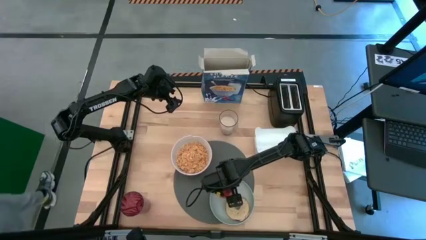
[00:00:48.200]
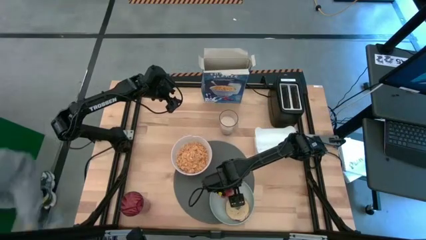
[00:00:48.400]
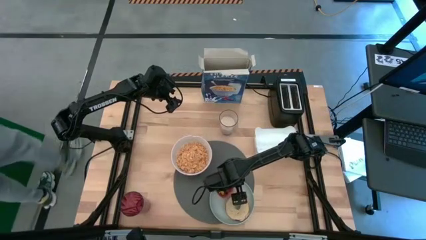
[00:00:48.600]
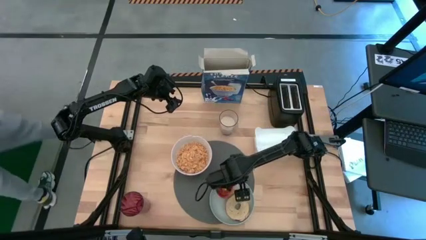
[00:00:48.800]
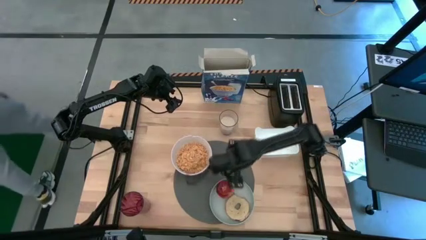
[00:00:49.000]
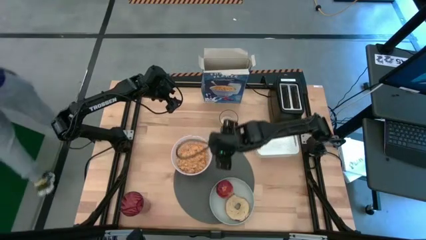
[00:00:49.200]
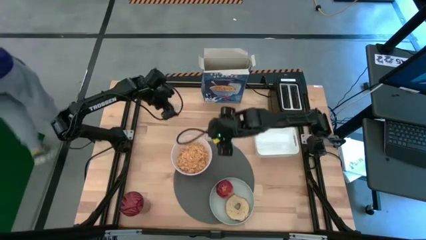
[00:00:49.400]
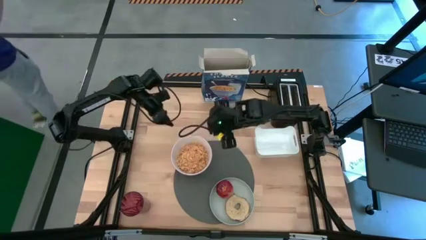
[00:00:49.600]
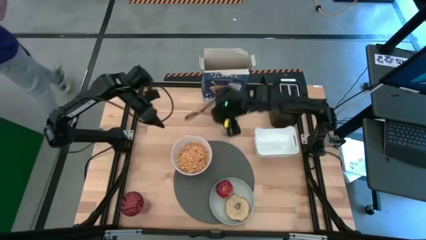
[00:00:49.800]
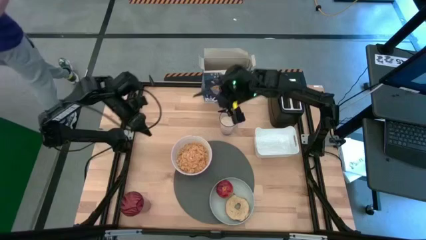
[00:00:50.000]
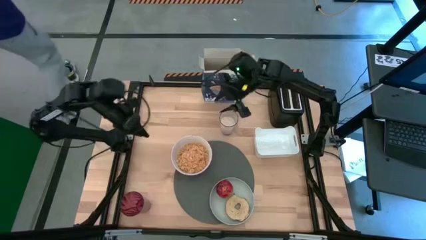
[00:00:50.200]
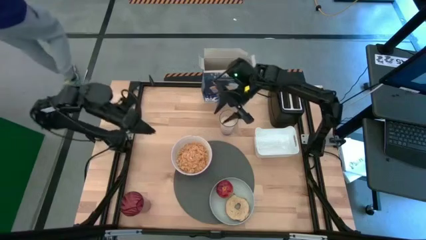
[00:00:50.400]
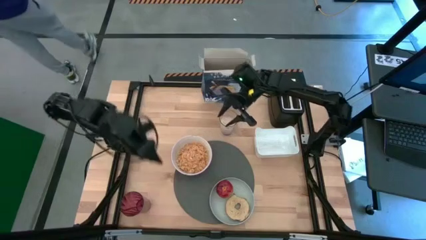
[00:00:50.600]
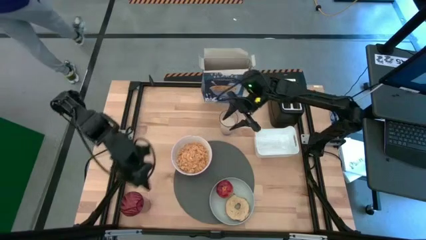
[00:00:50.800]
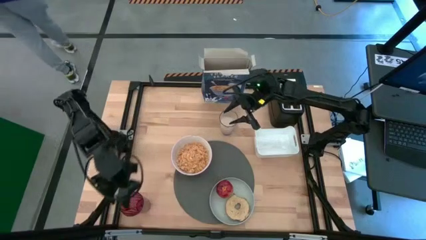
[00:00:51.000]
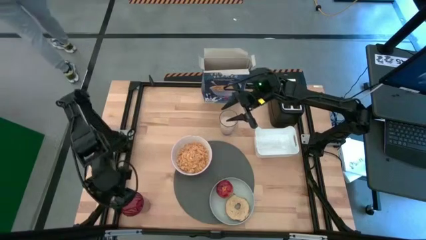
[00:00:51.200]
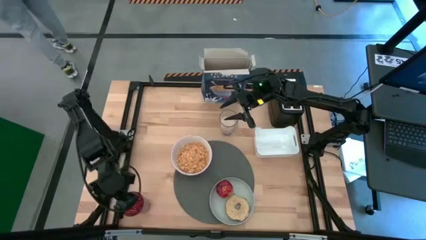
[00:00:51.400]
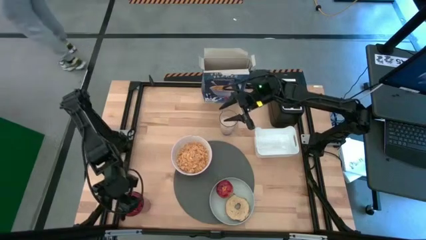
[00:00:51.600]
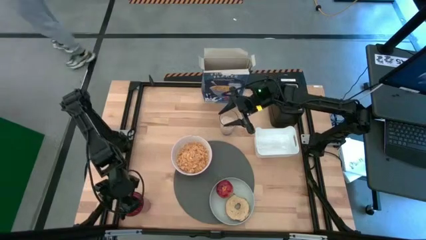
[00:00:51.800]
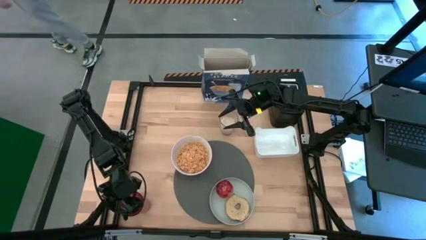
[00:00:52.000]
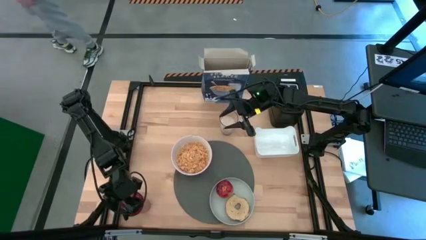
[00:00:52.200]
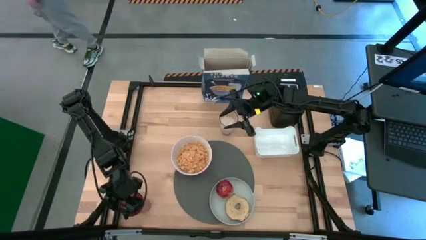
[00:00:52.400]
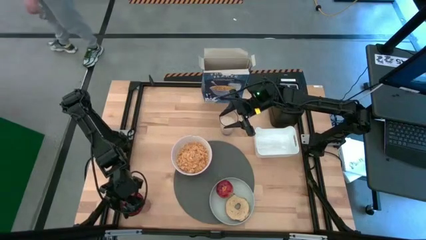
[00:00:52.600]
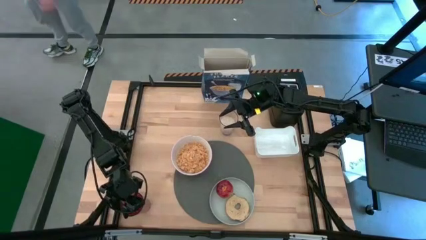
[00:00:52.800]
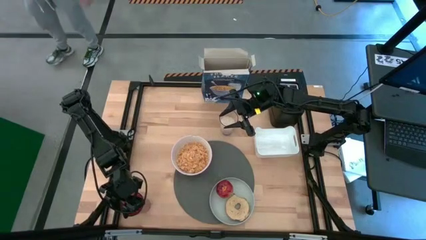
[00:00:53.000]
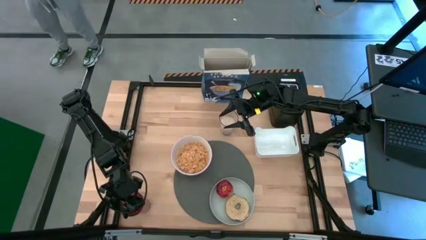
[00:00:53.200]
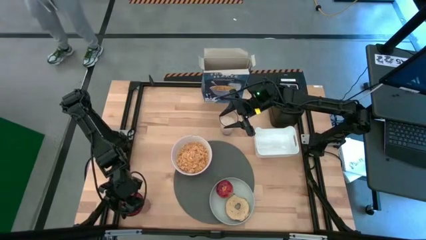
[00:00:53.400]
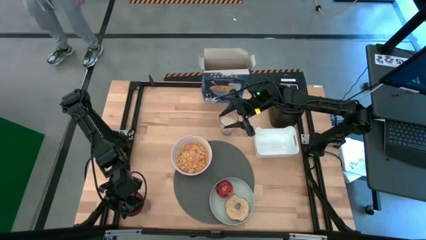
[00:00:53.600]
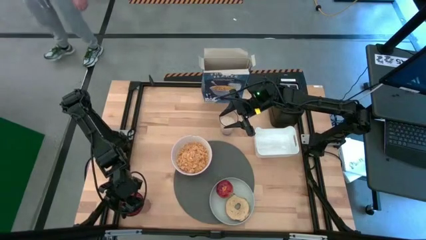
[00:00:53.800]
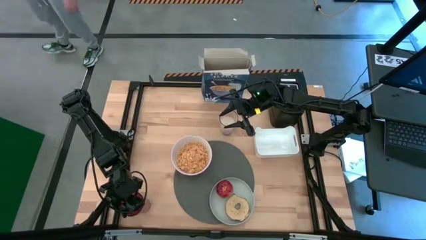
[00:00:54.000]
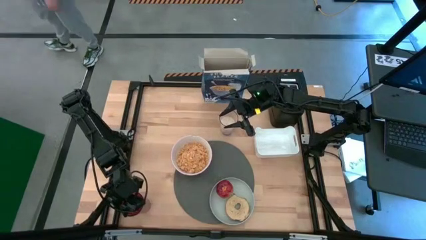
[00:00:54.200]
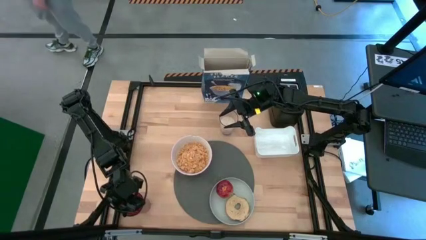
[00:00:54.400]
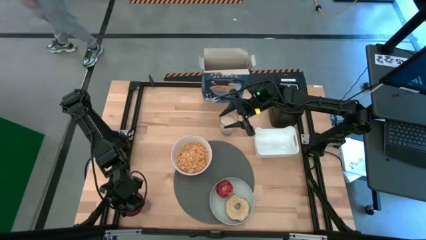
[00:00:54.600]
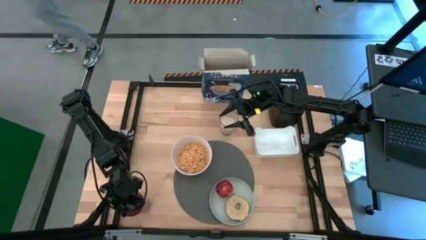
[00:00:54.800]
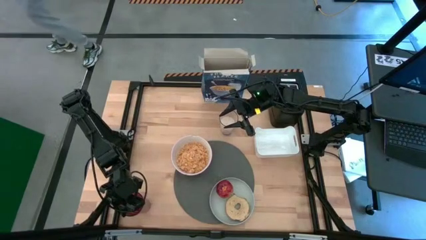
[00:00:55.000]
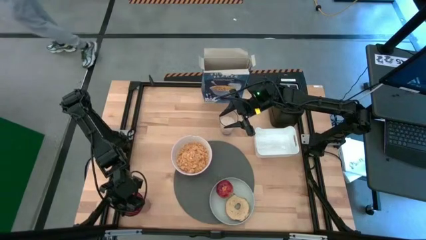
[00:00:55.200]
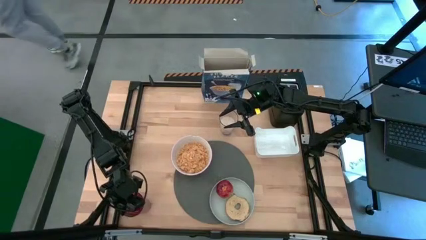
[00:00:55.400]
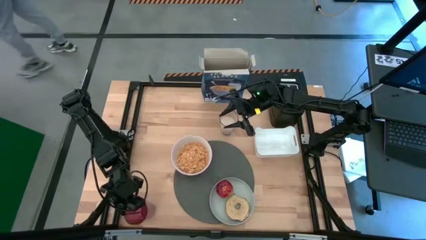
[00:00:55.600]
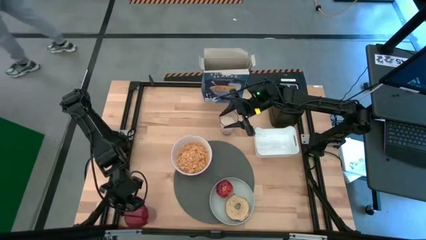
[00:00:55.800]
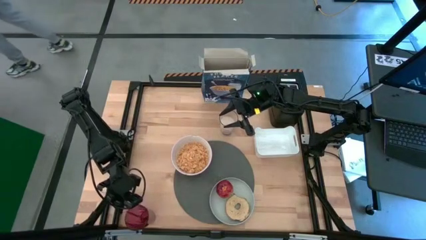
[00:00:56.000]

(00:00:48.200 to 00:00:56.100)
Task: Arrange a breakfast setting
Put the gold spoon on the gray mat to the right of the white bowl

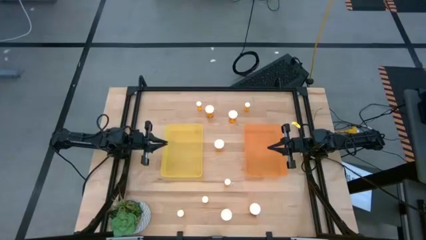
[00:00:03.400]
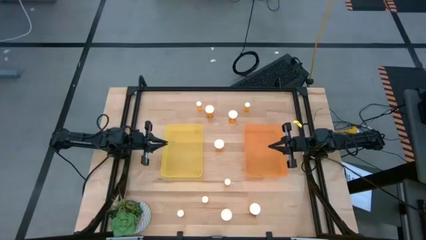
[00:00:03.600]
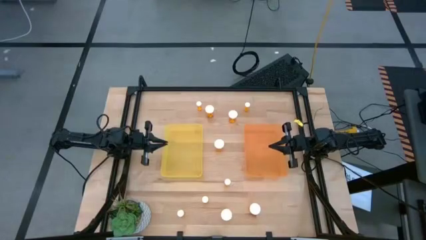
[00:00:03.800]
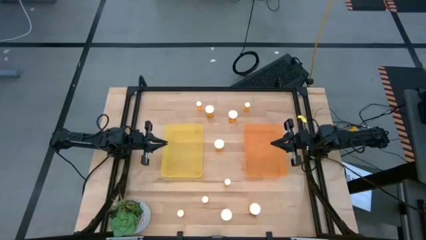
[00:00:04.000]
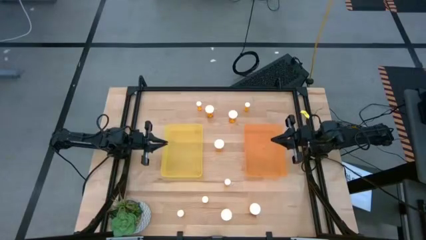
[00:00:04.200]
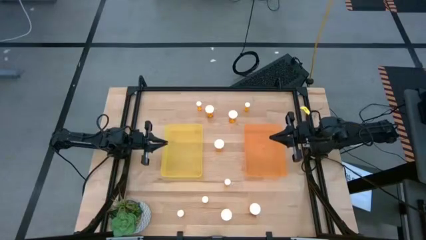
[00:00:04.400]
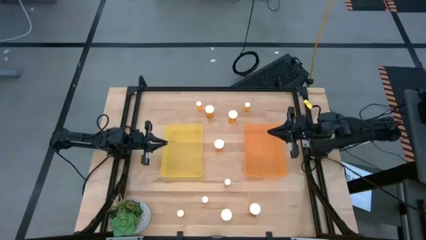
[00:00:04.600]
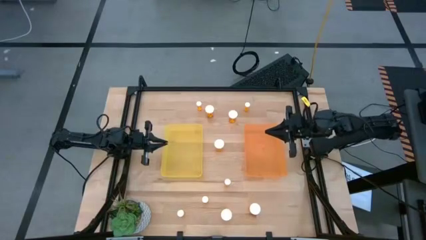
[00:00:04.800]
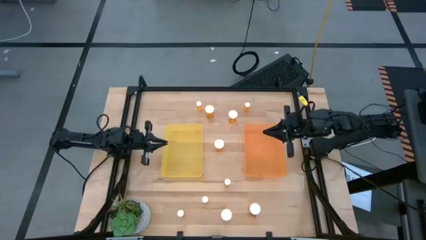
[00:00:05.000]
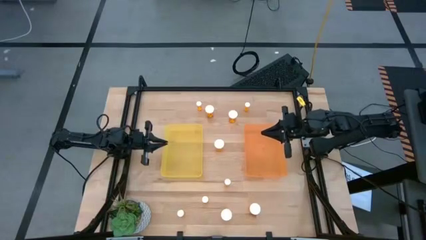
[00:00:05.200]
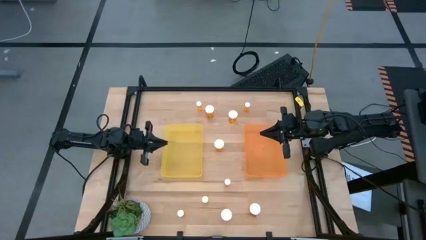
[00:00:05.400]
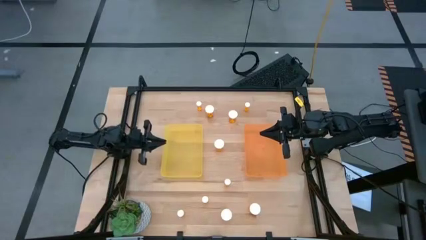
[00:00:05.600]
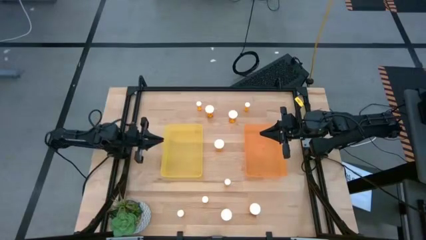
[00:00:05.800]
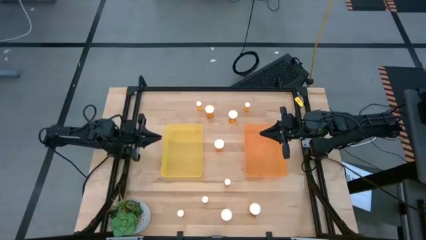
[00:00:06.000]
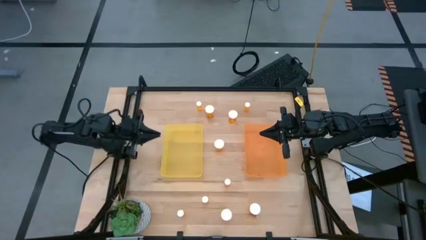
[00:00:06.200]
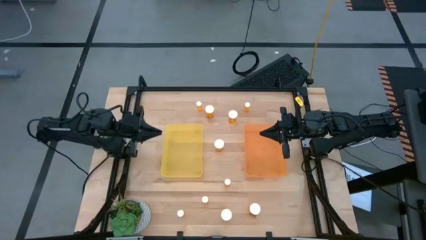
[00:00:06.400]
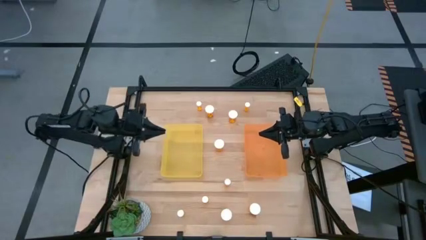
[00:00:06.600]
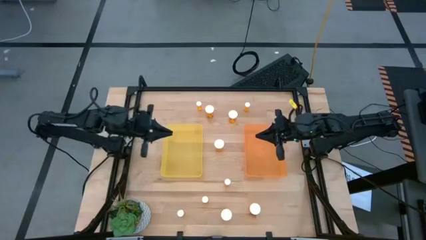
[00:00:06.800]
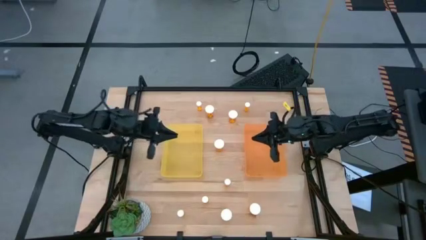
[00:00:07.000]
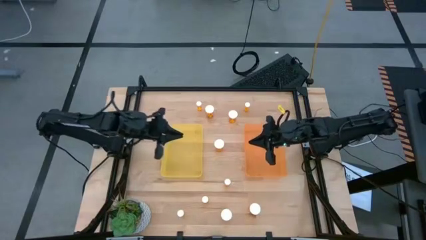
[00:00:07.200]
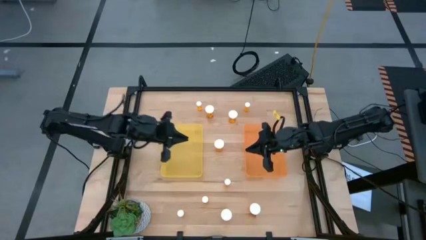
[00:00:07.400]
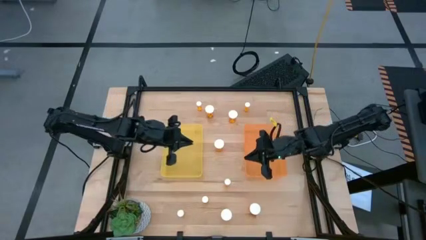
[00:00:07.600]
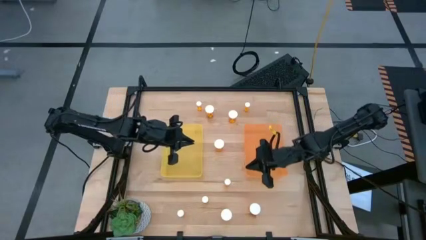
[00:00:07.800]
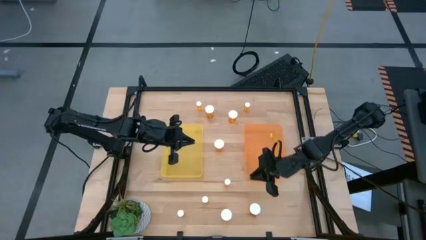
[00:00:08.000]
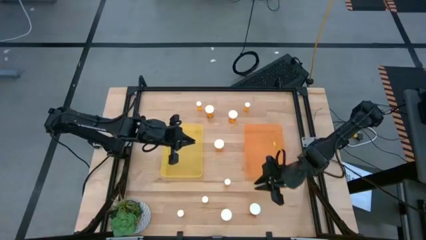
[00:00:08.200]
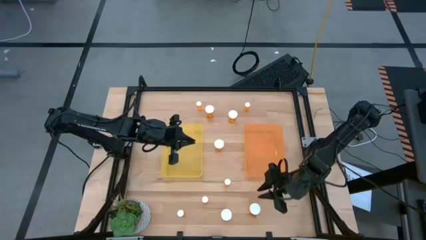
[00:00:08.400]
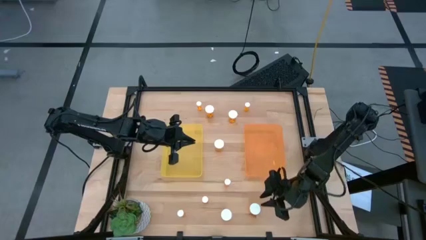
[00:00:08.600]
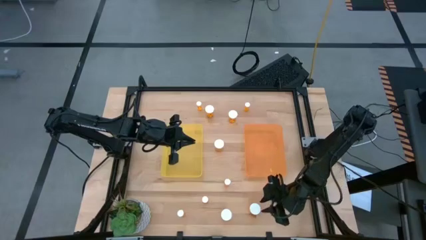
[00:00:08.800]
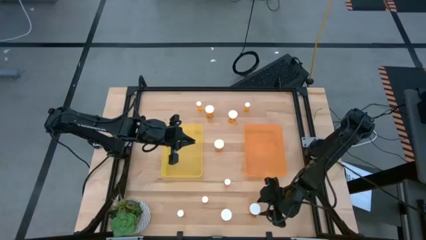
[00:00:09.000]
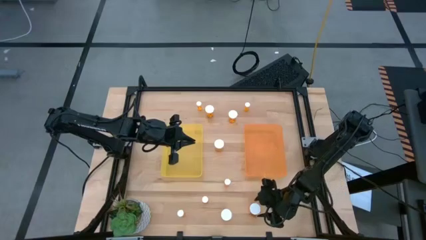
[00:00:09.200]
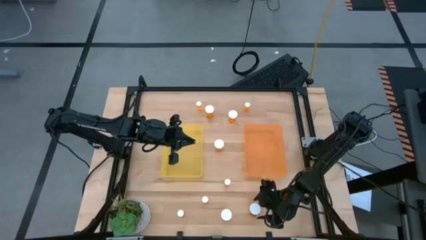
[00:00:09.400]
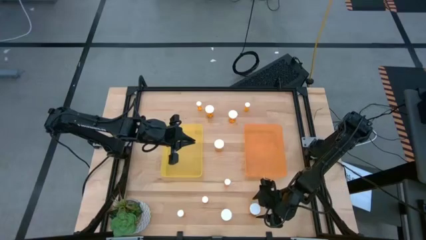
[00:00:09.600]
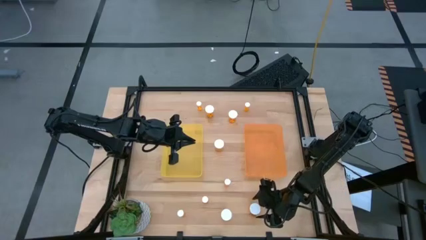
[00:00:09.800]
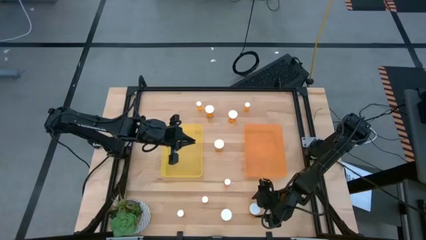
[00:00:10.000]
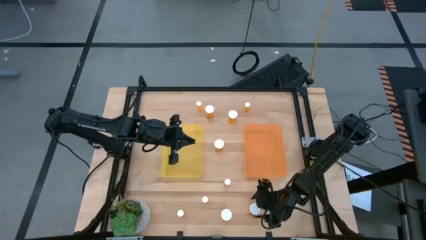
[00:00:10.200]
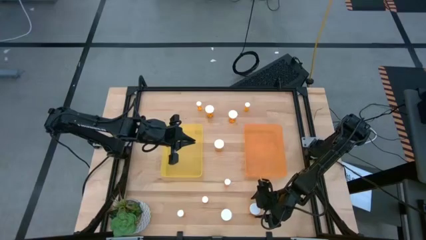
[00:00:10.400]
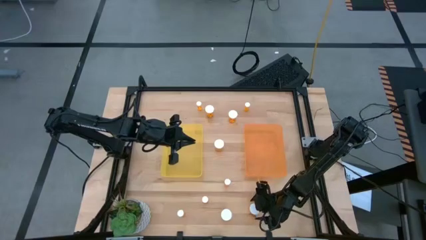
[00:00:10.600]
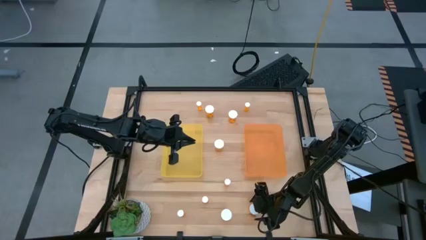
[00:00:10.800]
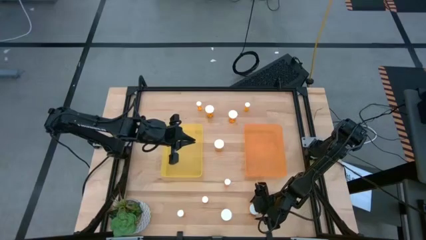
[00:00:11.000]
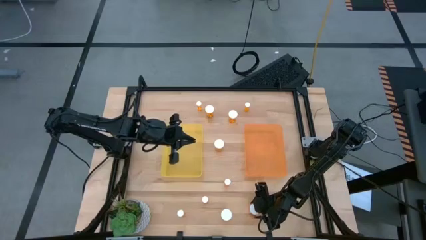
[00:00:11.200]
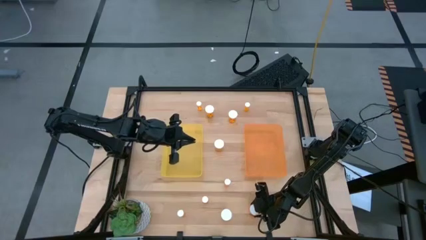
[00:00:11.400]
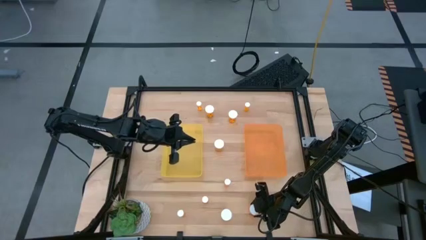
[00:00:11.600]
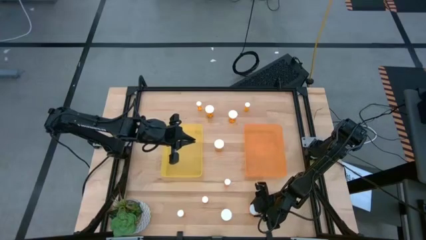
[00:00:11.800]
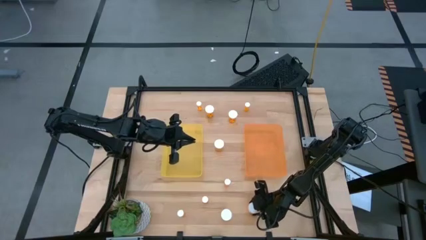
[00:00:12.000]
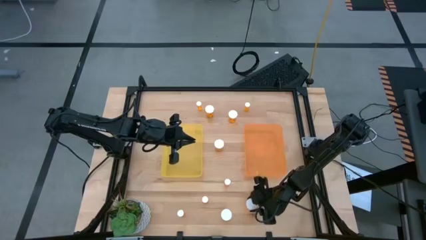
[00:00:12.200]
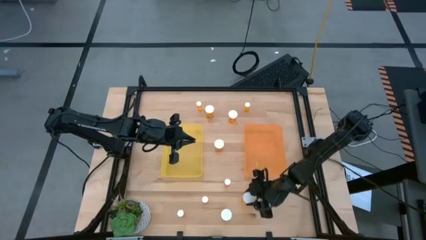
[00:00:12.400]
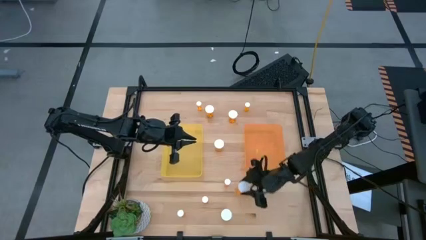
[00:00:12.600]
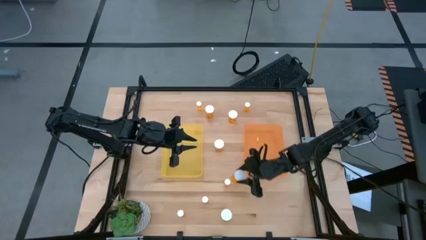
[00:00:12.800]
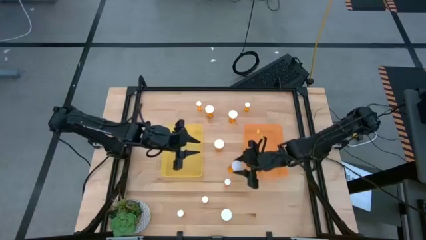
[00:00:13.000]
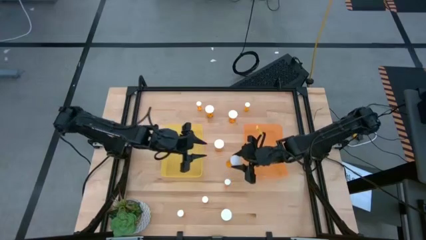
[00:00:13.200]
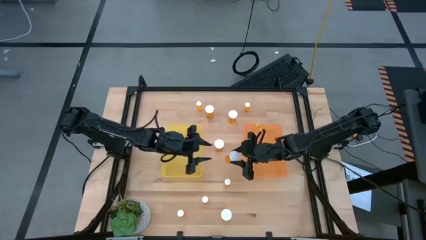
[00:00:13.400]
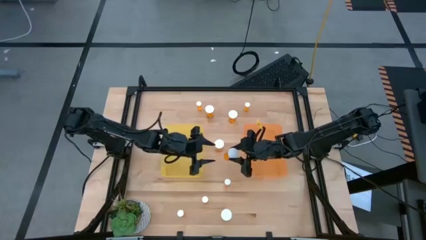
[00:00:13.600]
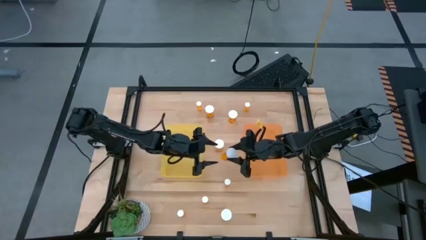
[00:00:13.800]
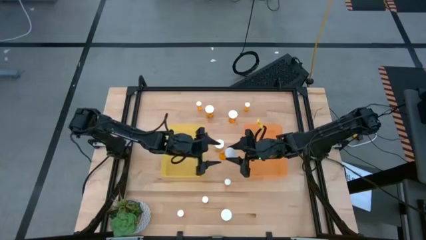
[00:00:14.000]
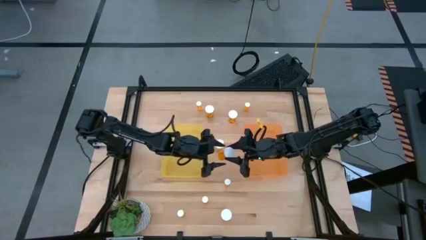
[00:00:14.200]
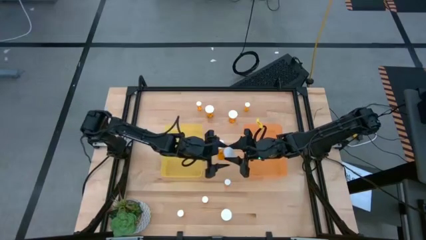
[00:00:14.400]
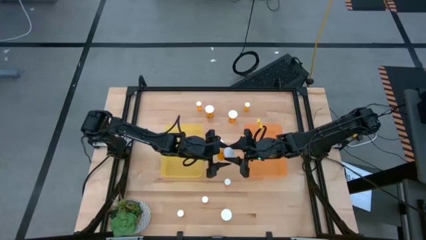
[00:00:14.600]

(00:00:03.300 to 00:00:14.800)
Task: Pick and place medicine bottles into bin by pill shape (circle, oval)
Put the large orange pill bottle into the yellow bin
